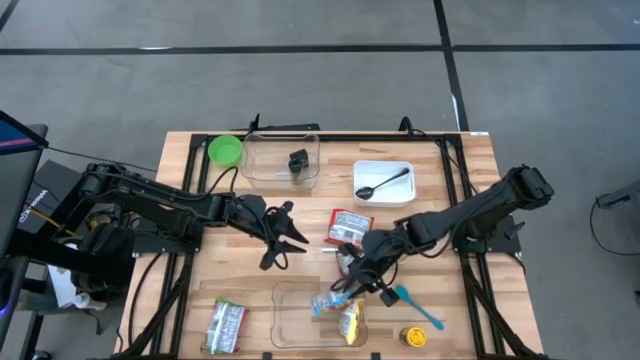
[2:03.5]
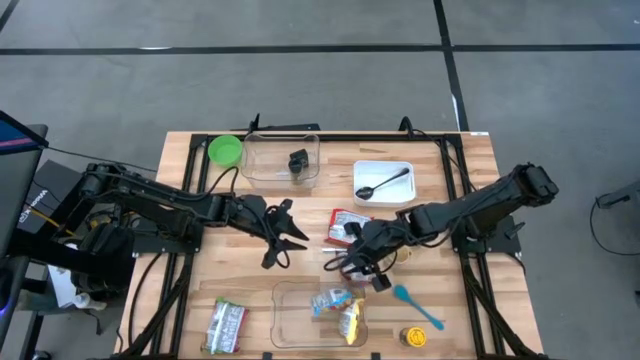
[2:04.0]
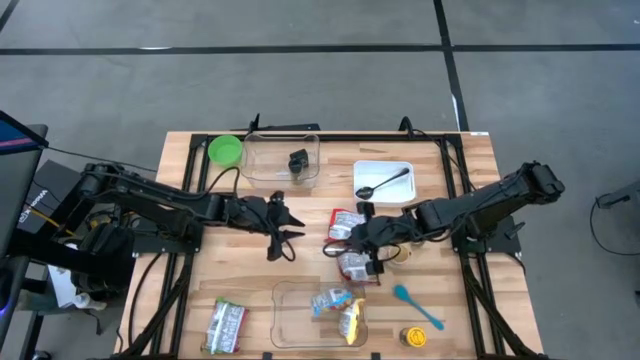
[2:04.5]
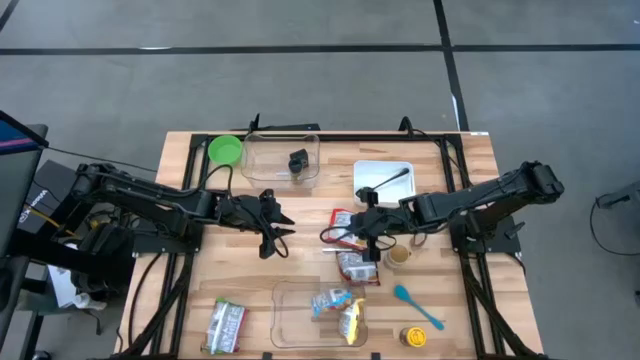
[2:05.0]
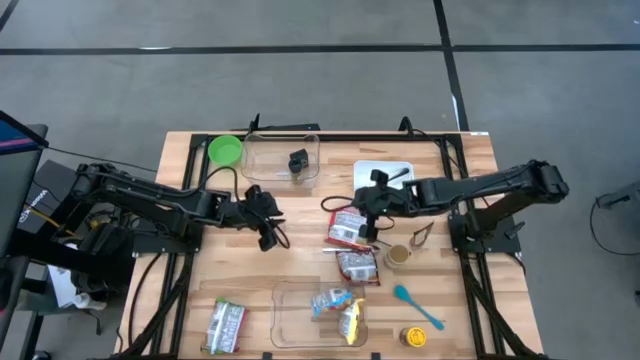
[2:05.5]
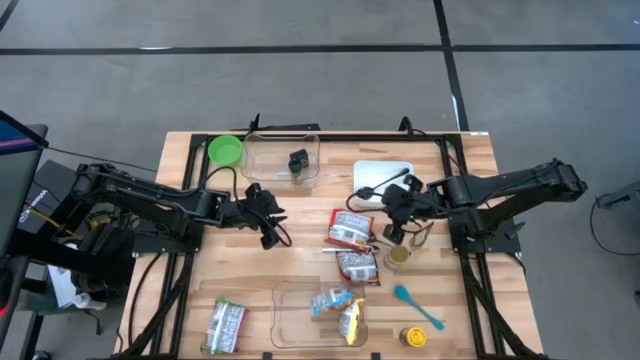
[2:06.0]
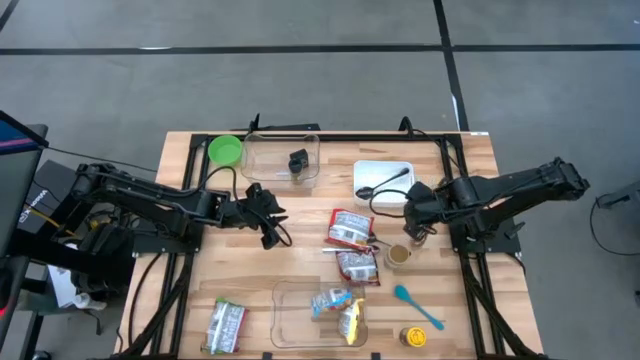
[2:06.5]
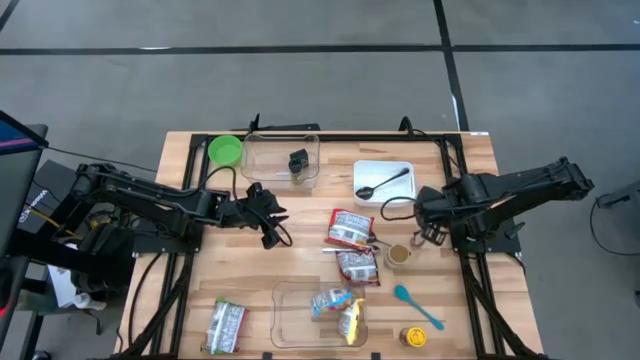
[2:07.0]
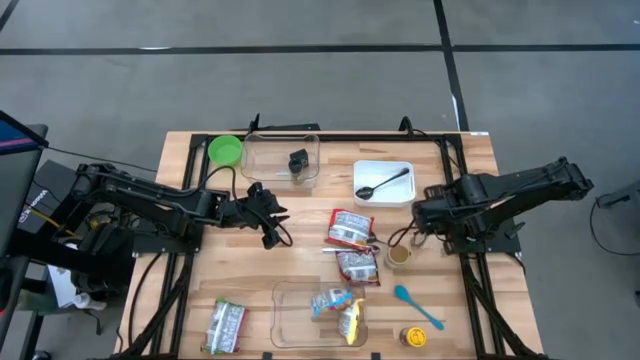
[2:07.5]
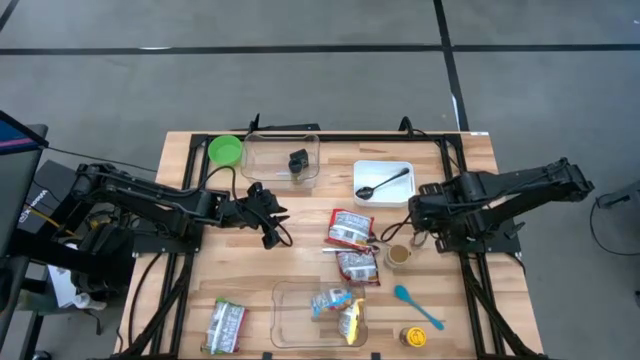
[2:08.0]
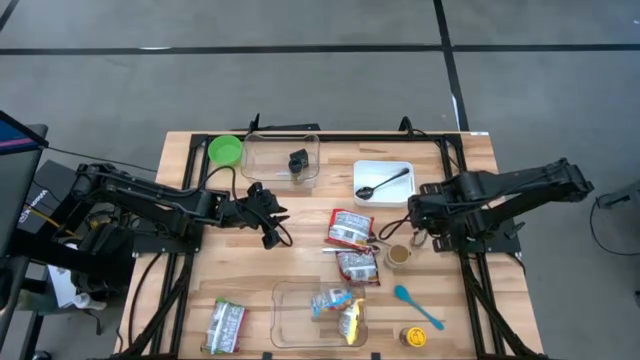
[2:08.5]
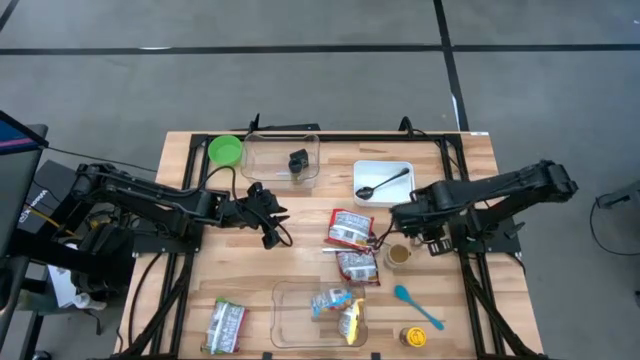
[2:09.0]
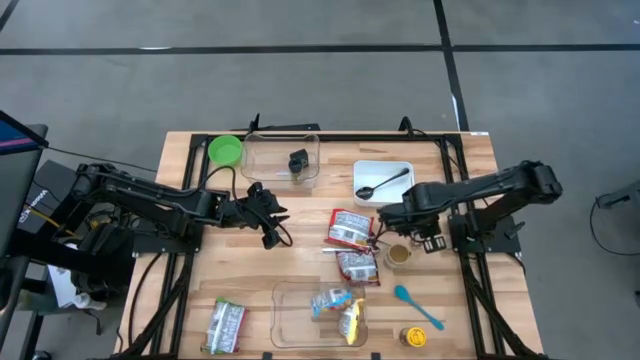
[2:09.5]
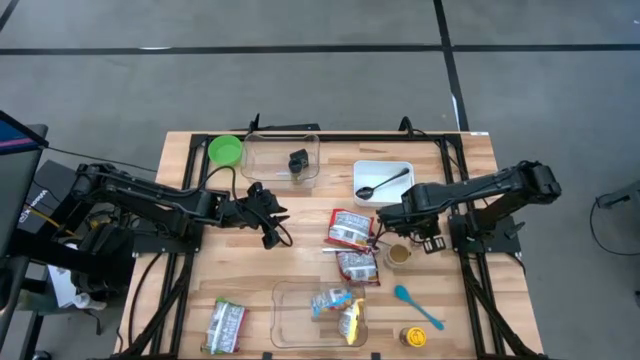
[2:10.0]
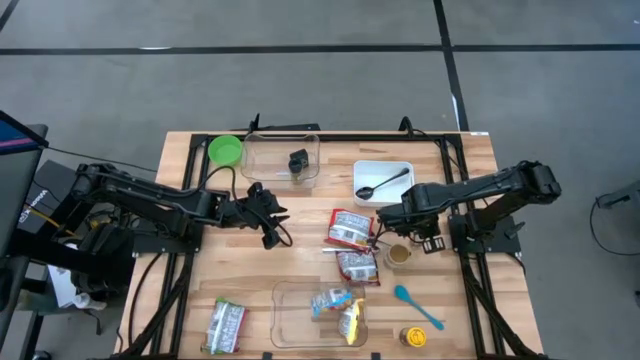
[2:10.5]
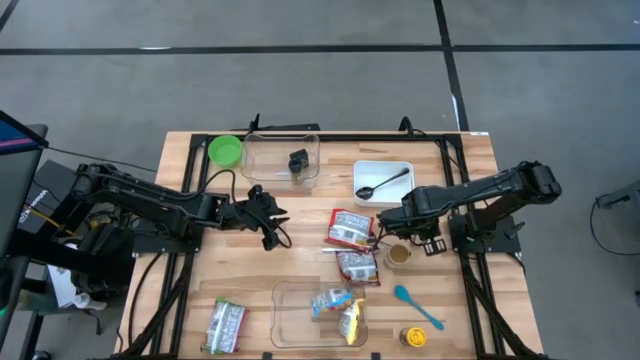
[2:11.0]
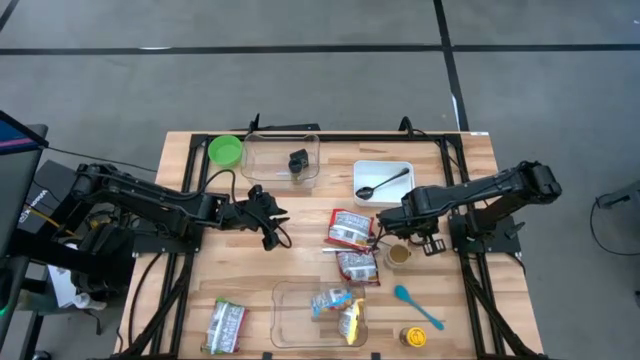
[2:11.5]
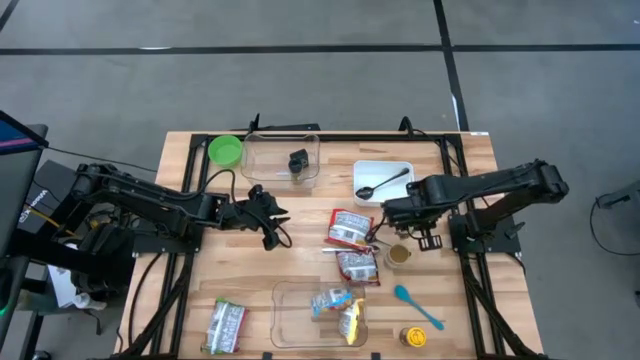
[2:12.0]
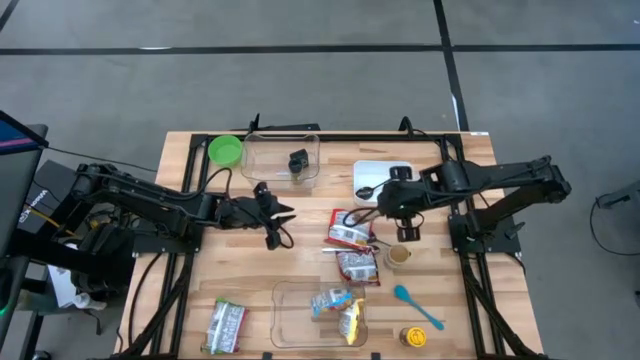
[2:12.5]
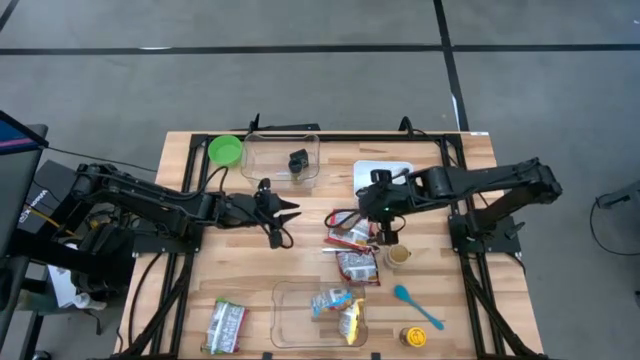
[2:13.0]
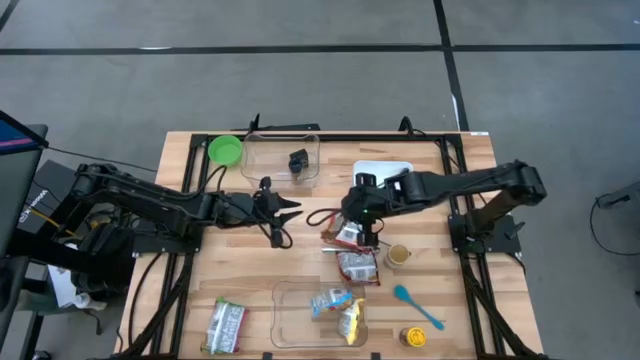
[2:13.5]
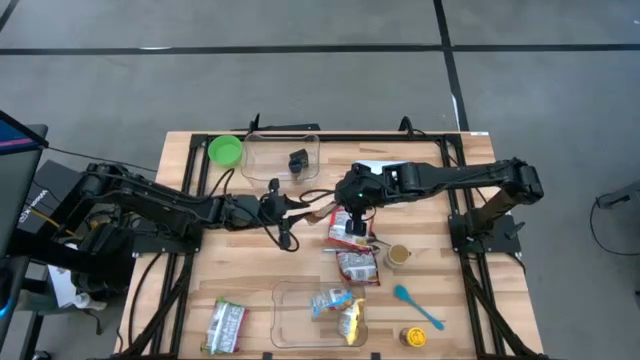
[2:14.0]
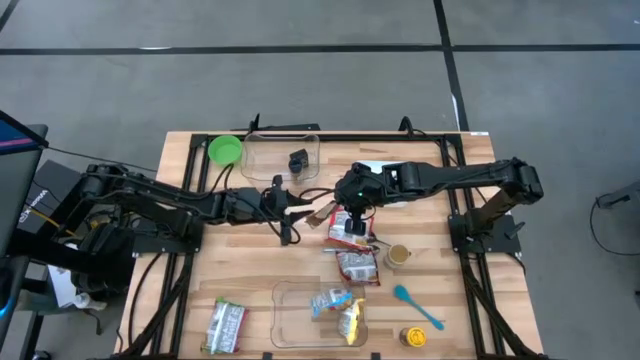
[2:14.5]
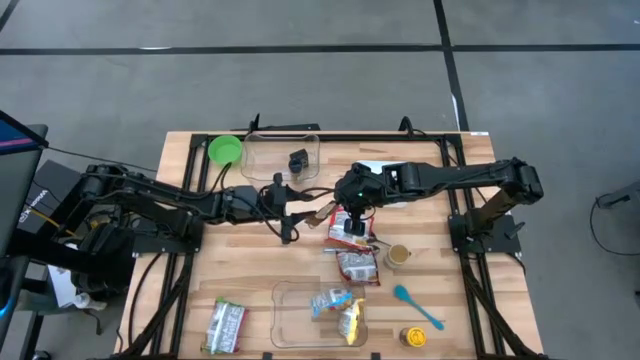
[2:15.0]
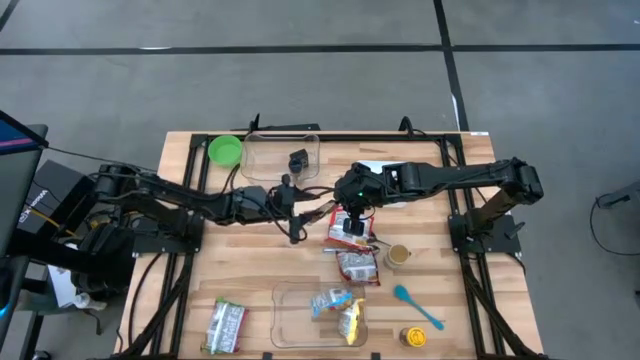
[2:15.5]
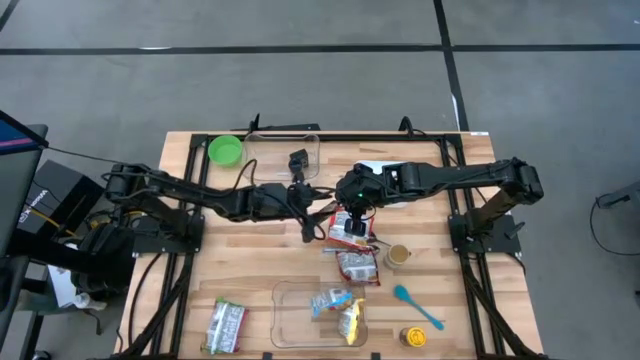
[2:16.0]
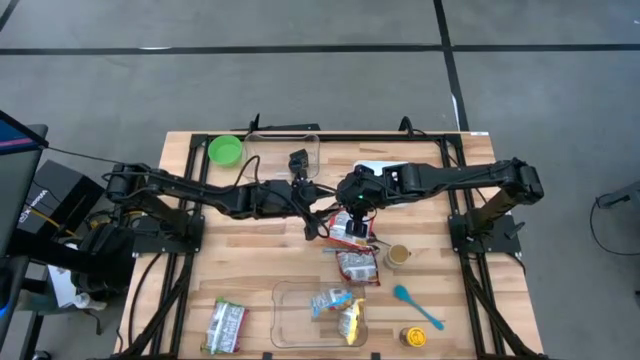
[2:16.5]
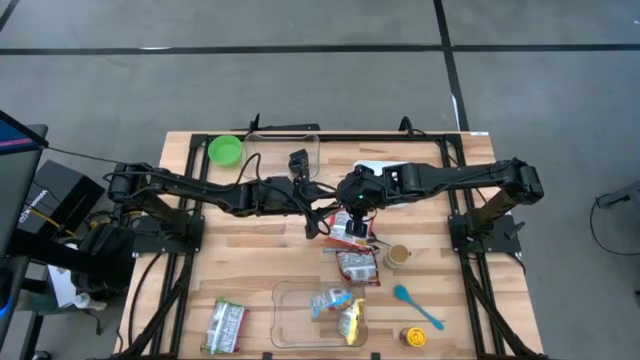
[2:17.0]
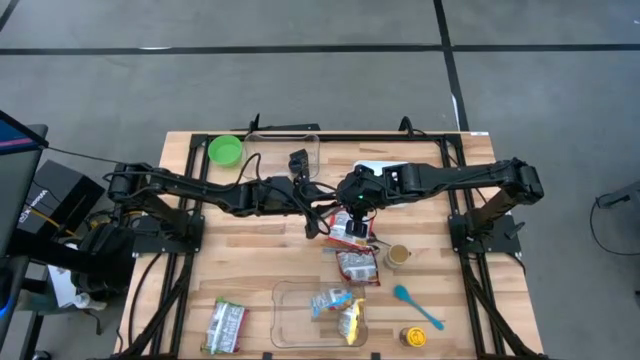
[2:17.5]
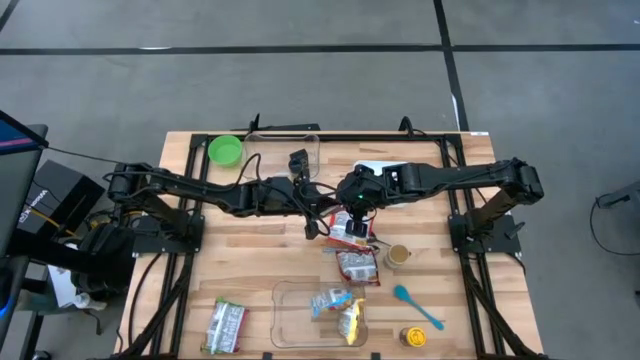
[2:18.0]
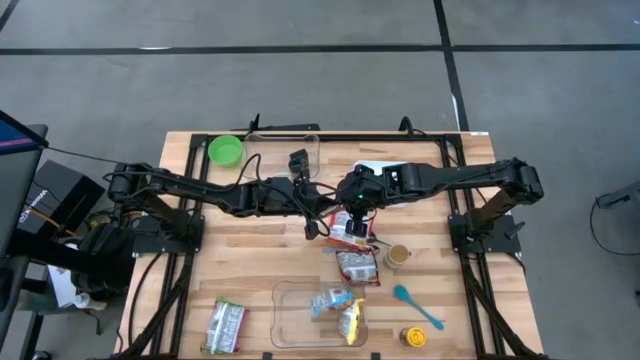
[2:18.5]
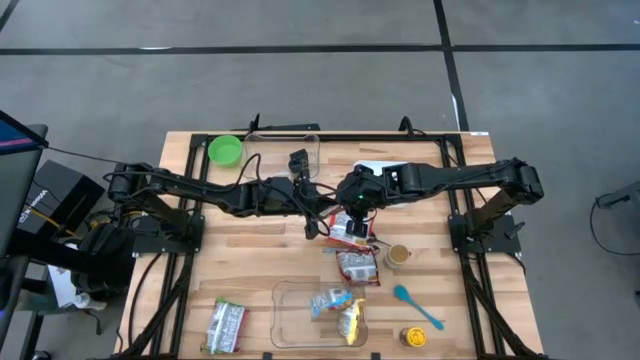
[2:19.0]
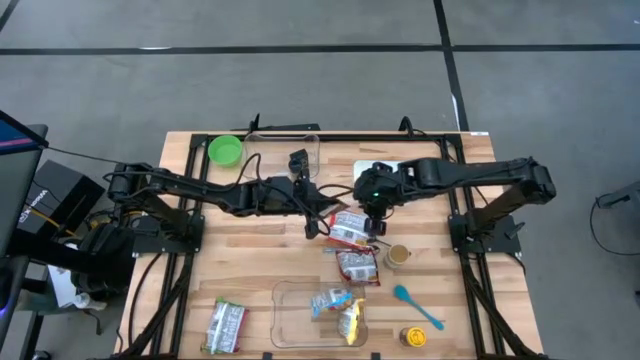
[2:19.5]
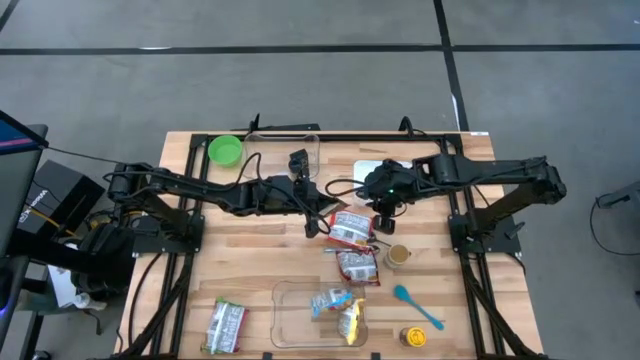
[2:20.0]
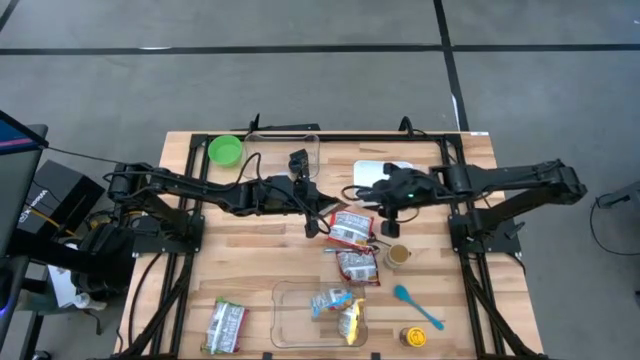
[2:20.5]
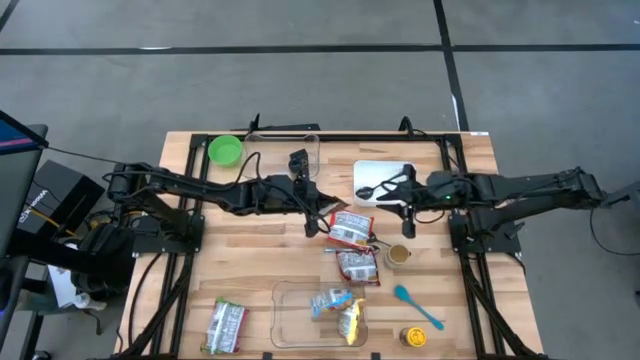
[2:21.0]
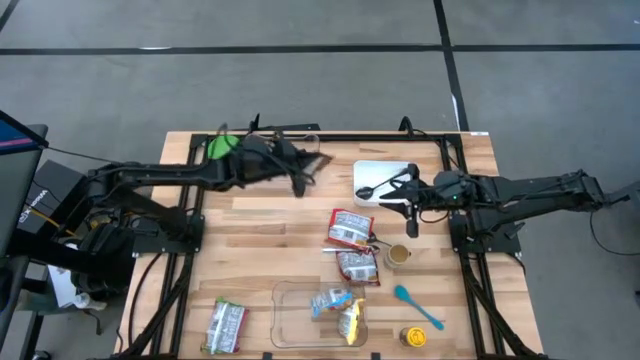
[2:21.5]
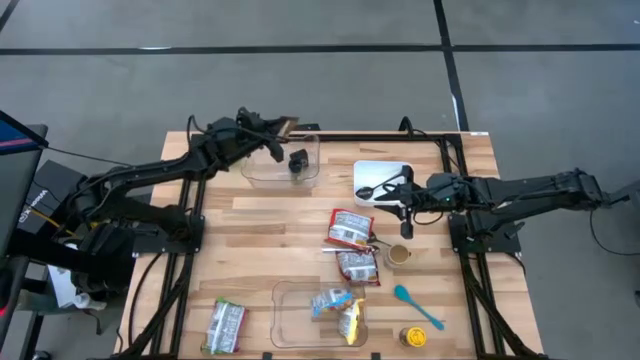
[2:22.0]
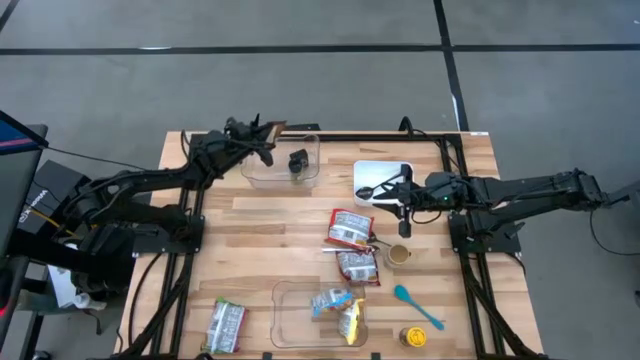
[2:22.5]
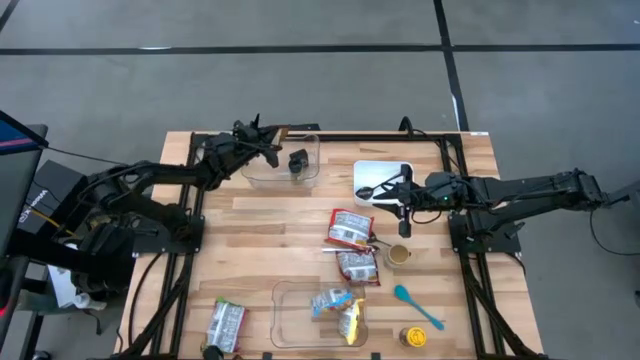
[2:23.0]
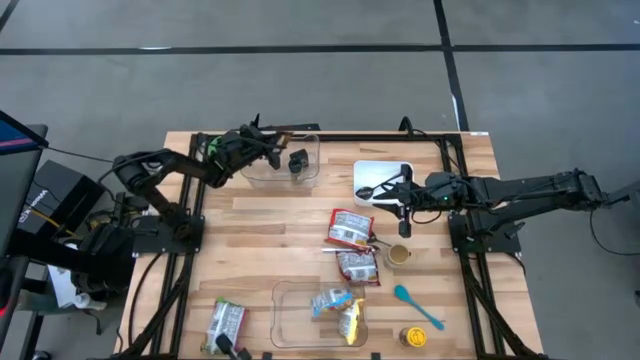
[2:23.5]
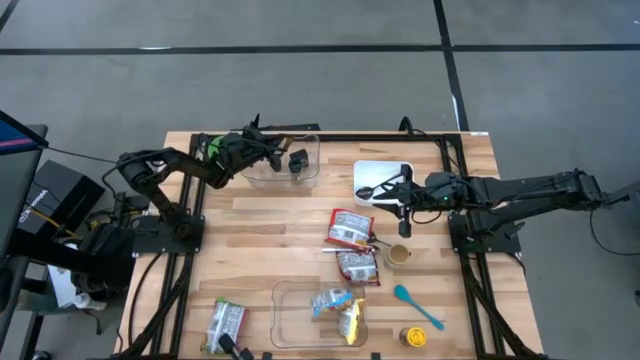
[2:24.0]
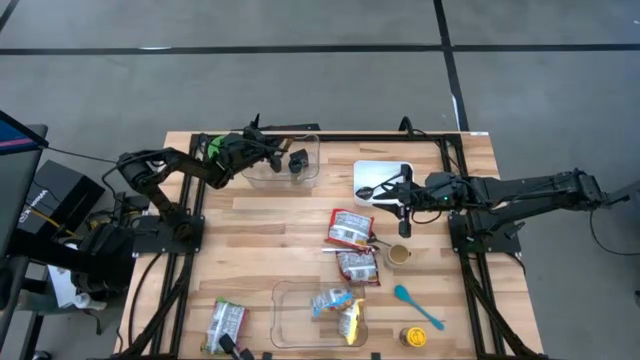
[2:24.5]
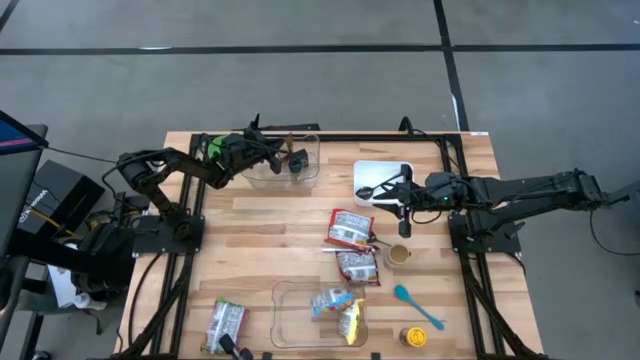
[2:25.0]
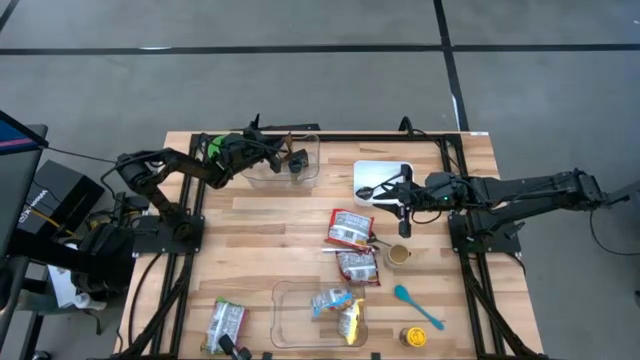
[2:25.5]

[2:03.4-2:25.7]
Task: Pick & Place Food Item
Put the orange seasoning pack into the top transparent bin
